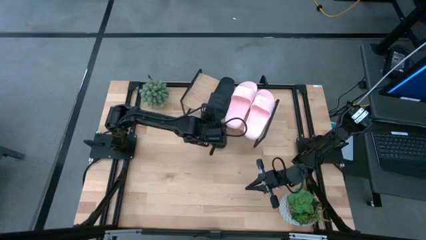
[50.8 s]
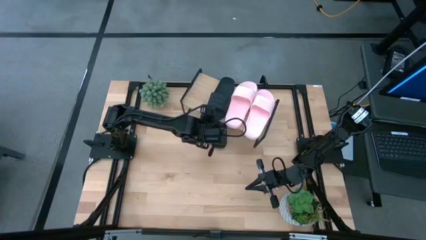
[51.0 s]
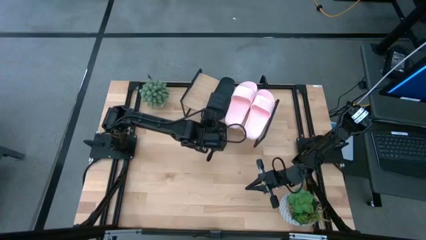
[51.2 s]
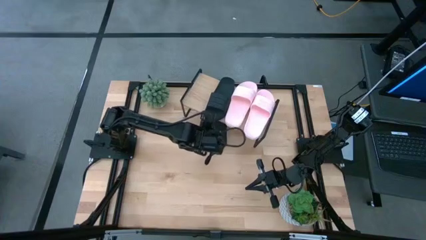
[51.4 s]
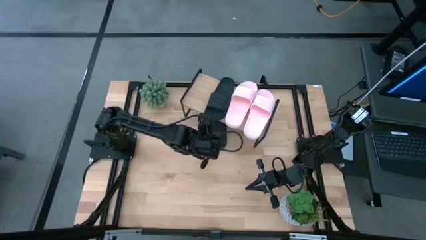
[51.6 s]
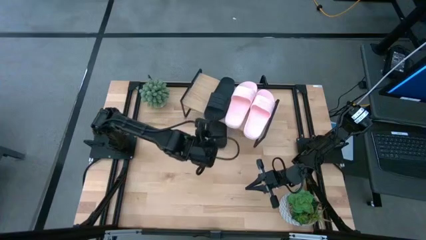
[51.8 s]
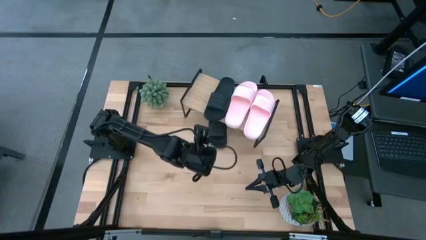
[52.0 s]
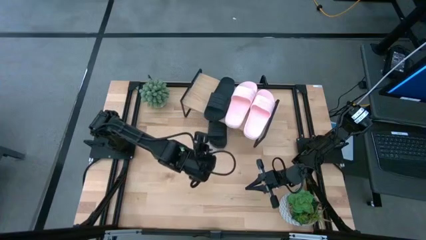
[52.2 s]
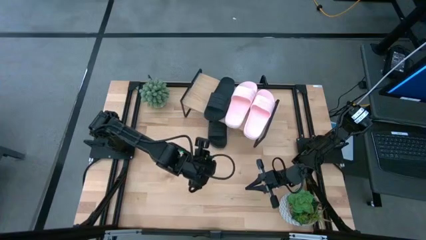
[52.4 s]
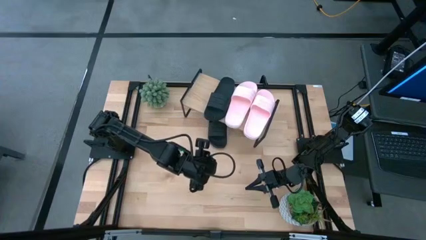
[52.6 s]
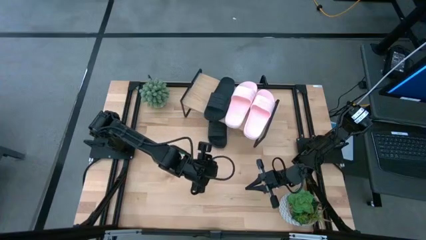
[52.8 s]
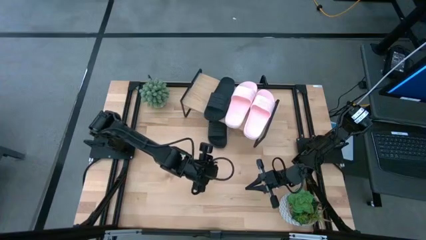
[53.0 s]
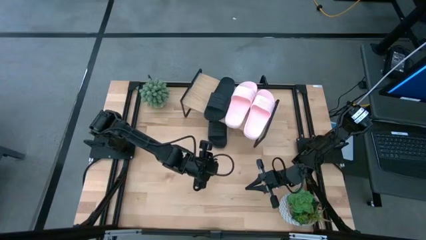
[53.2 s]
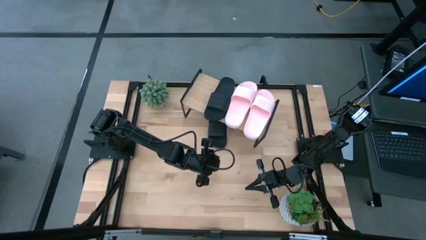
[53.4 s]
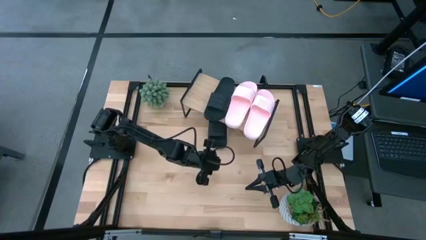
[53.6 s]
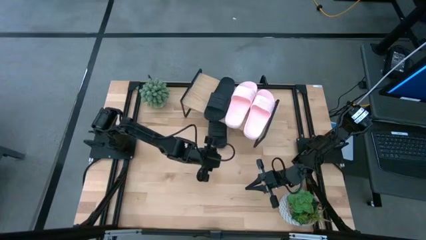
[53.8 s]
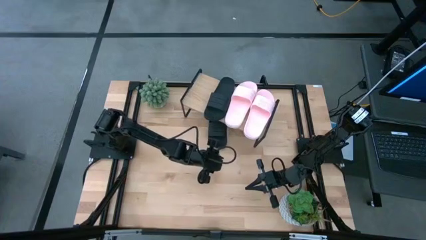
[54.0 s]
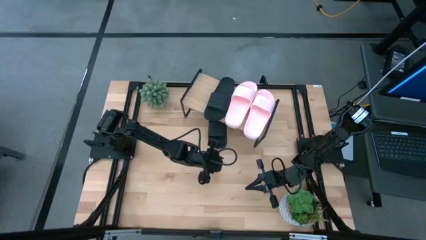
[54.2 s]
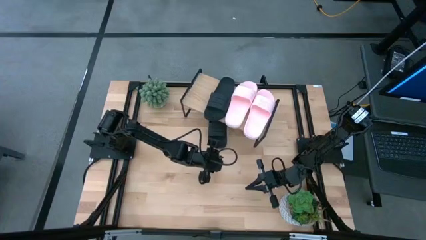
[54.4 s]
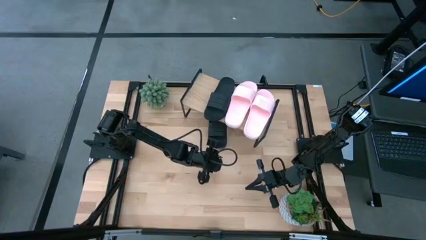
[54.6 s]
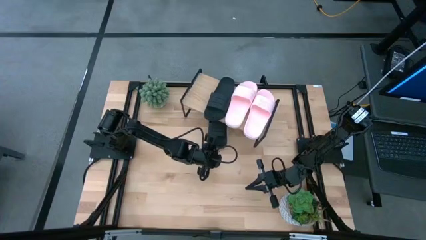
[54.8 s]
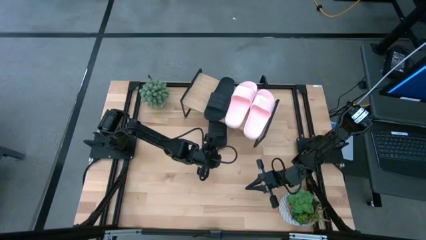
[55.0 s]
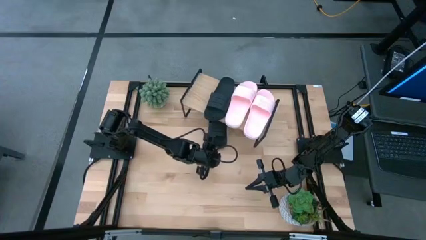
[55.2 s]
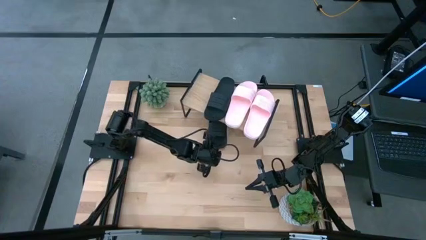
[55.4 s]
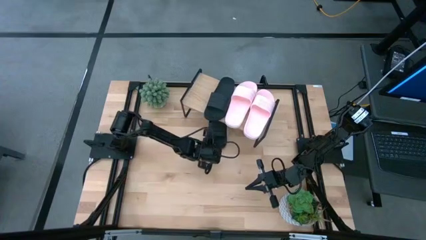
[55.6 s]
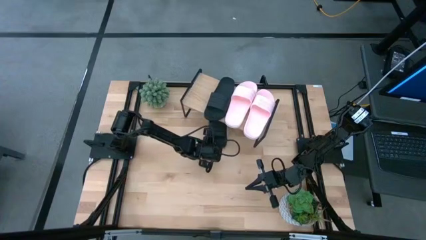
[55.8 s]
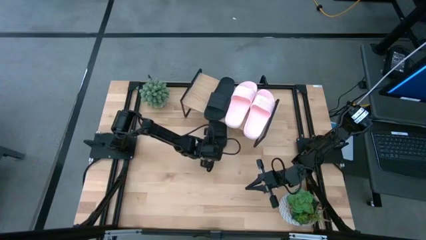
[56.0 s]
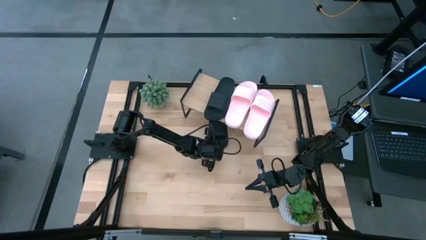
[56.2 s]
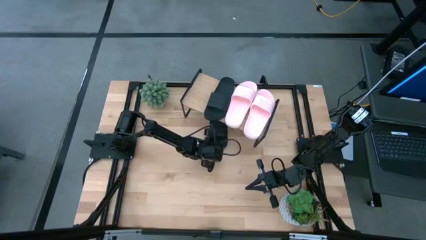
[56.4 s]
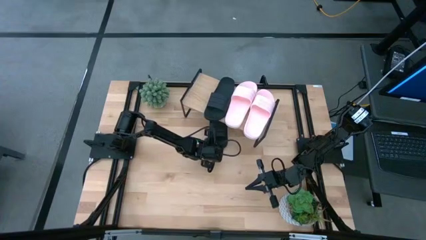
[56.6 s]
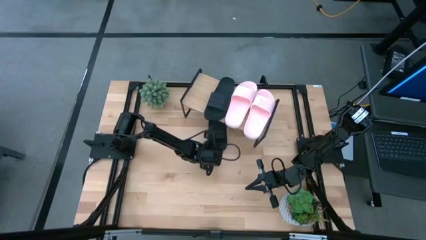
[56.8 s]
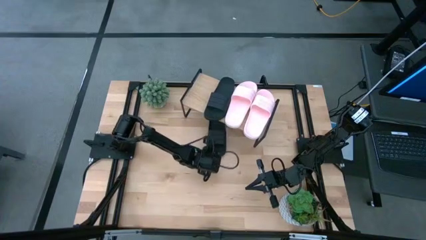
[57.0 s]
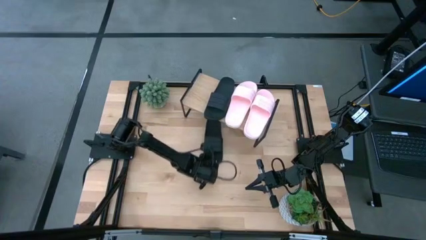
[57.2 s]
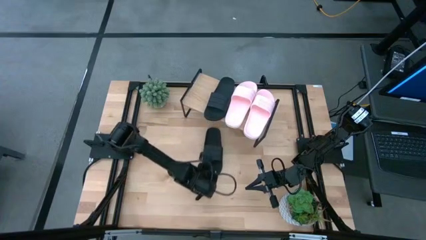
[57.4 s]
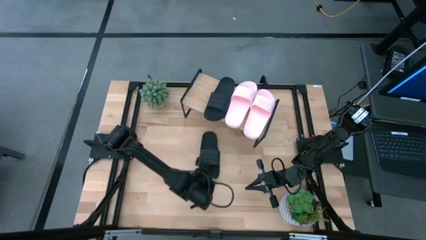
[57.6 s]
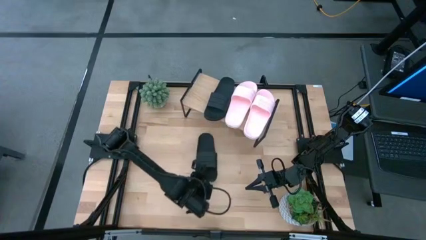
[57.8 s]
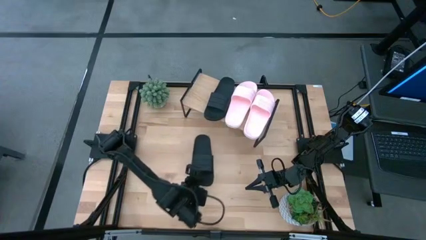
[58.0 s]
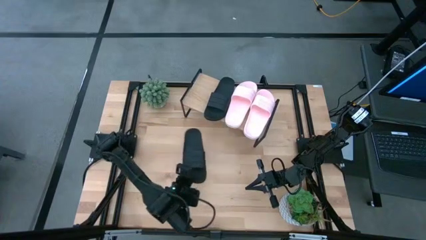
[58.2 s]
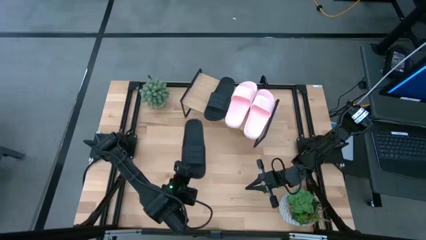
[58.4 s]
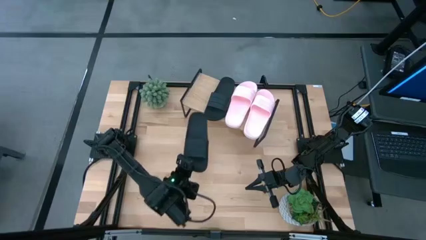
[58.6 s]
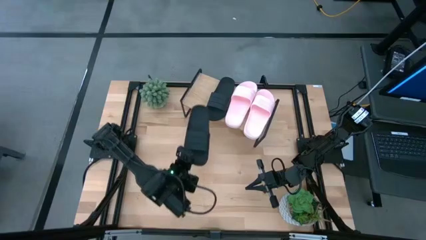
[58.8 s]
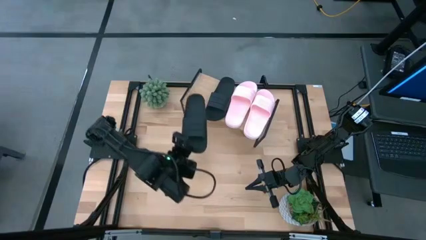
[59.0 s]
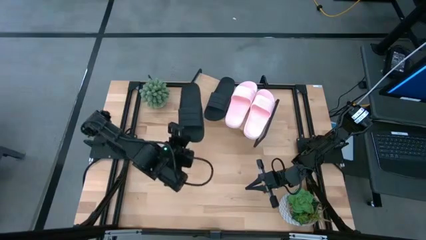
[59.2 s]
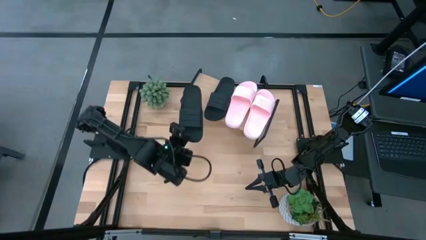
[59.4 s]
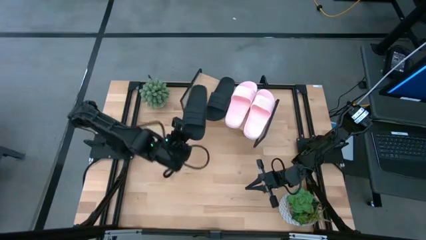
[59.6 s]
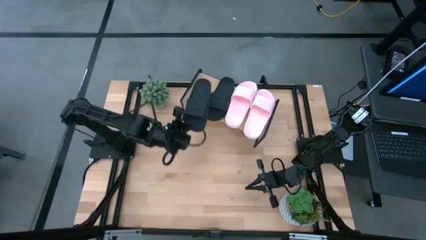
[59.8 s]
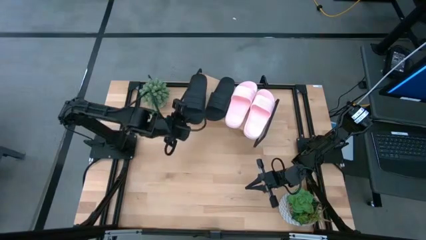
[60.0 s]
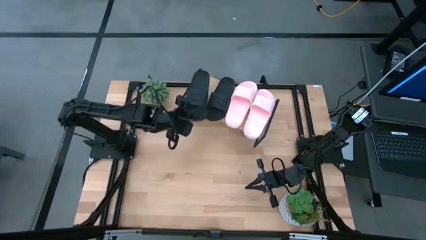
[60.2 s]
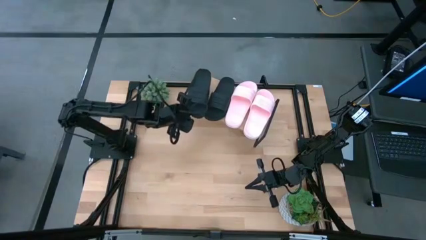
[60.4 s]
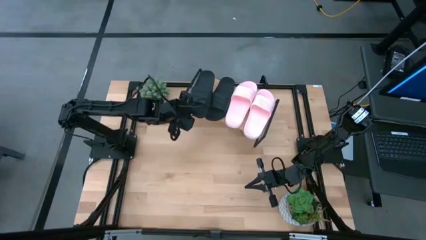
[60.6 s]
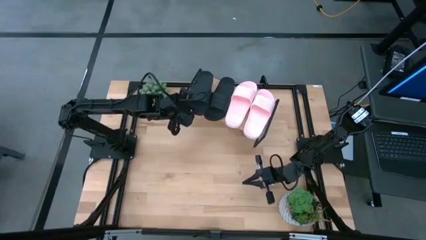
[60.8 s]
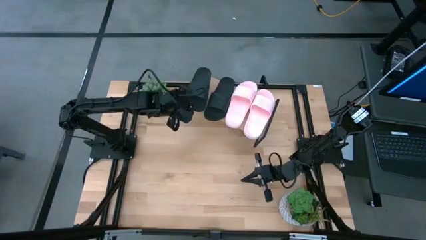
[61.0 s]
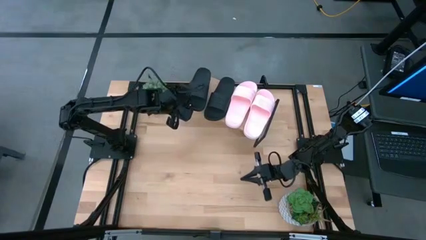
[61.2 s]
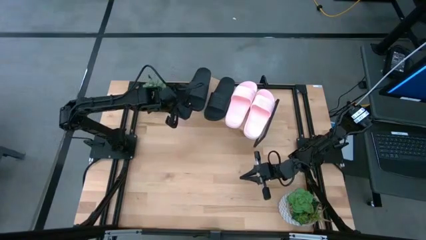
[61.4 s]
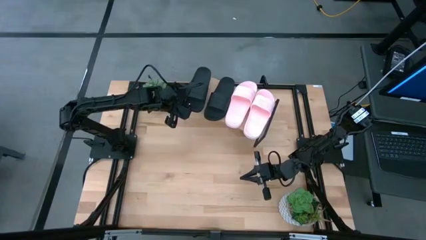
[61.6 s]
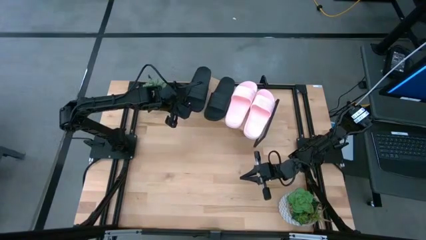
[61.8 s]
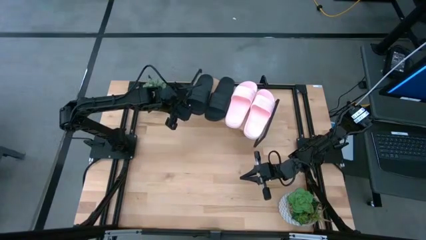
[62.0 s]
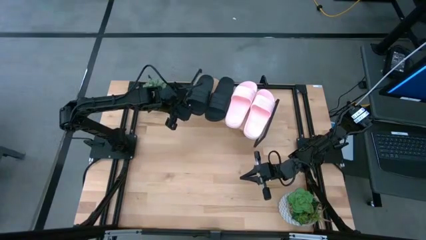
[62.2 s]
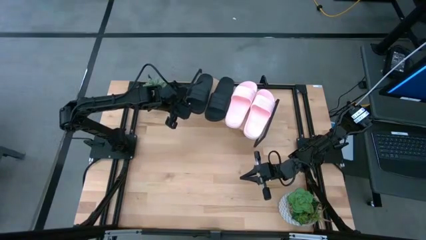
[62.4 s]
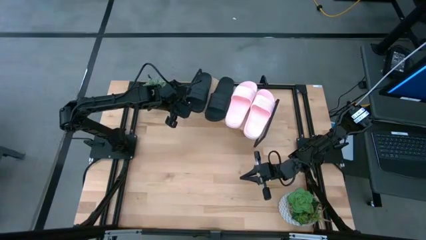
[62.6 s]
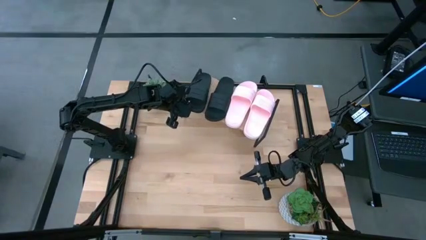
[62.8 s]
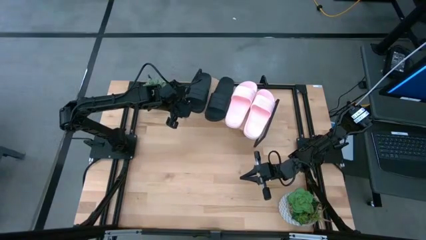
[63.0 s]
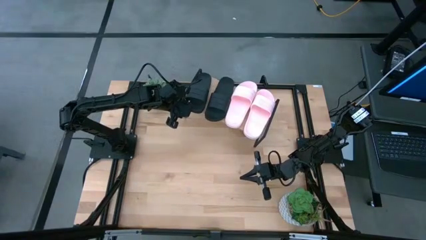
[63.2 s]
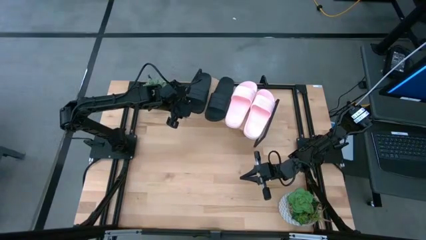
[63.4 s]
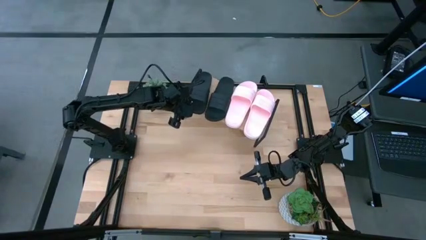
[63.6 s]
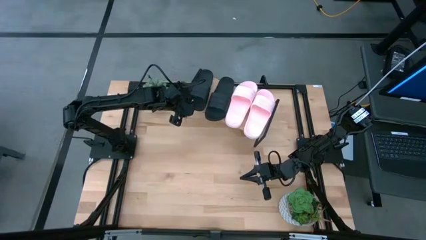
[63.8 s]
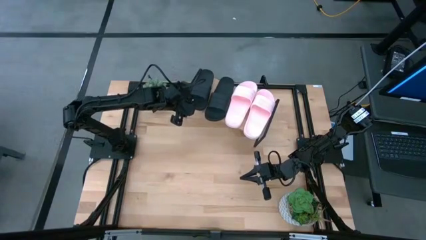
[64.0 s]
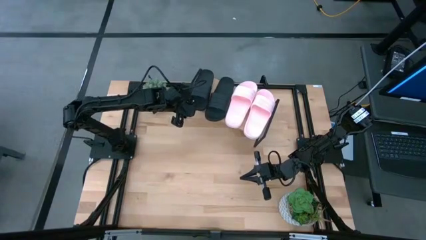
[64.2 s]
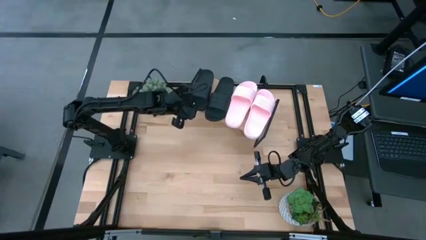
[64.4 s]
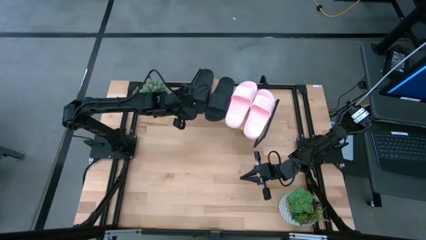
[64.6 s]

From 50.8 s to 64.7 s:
Task: Pick and place slides into the shelf
Put the black slides on the shelf
